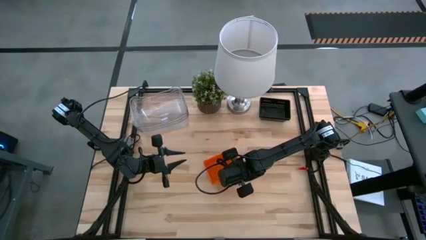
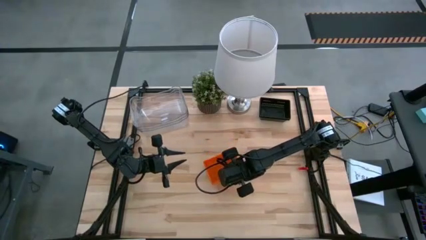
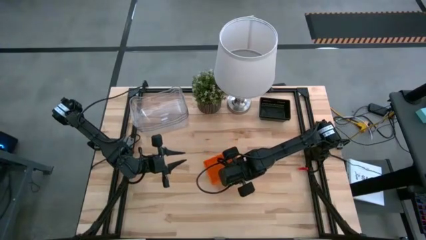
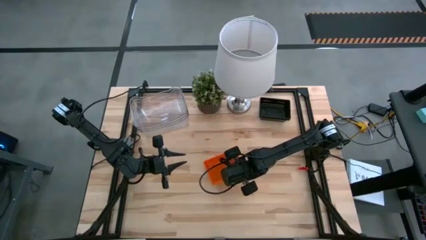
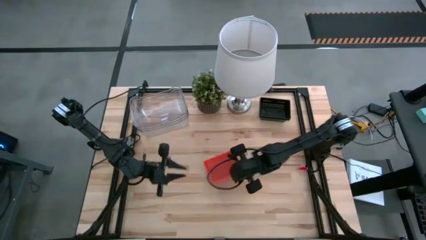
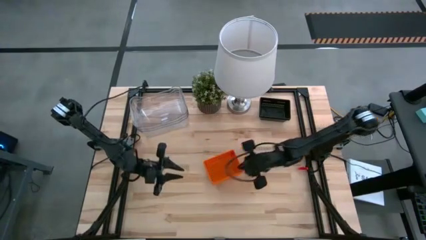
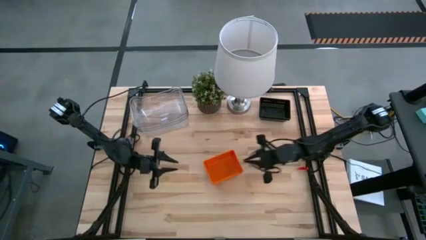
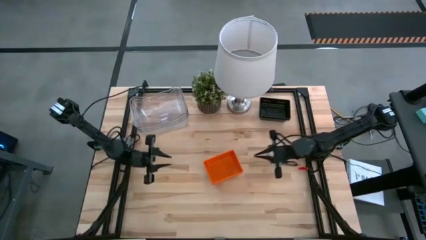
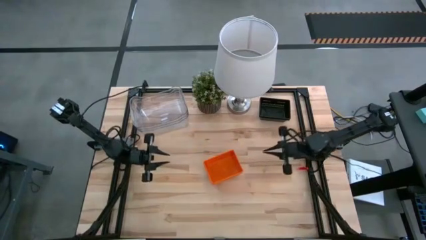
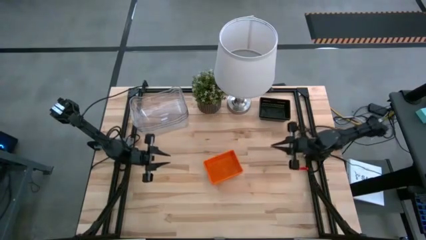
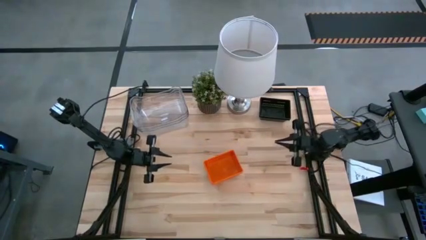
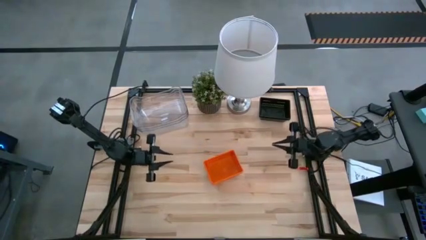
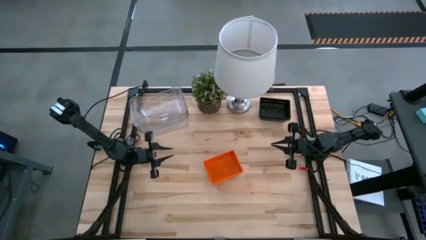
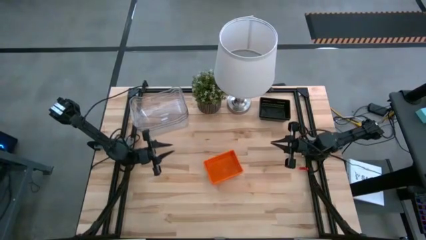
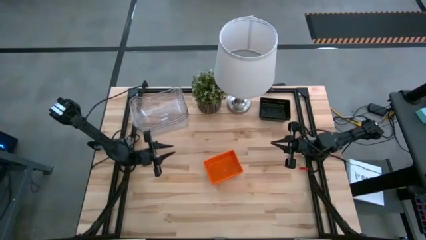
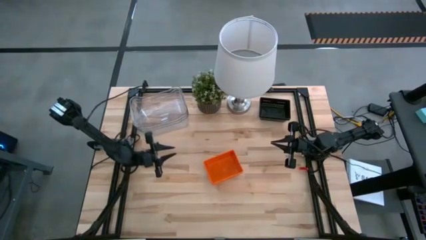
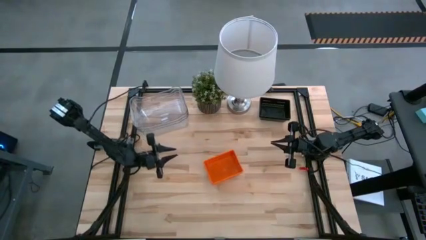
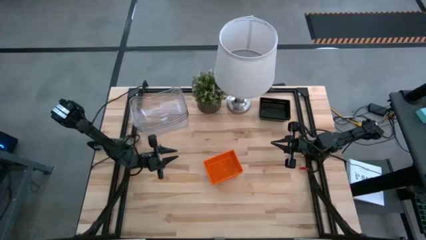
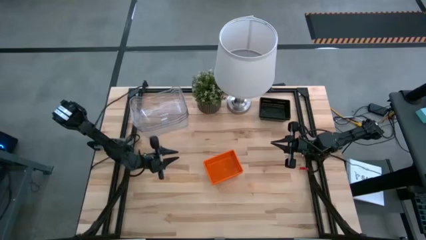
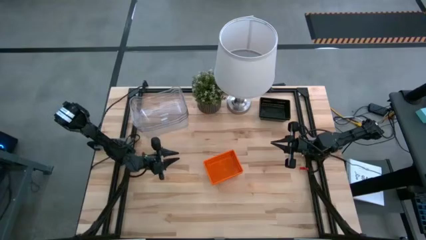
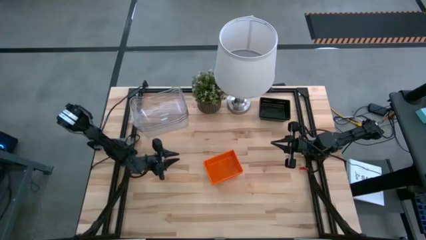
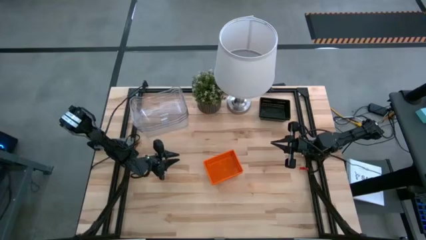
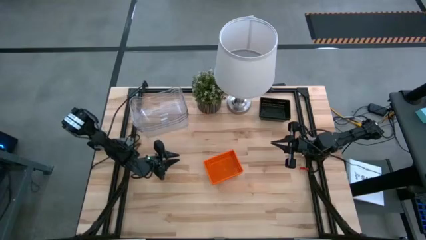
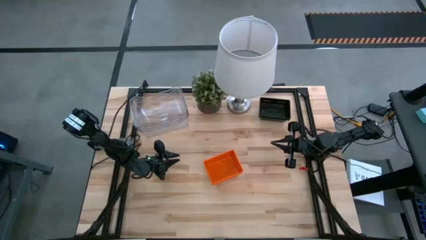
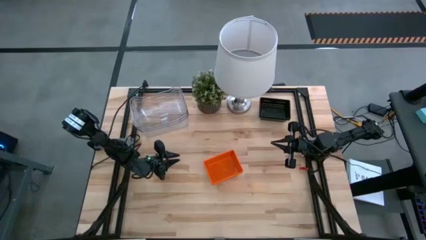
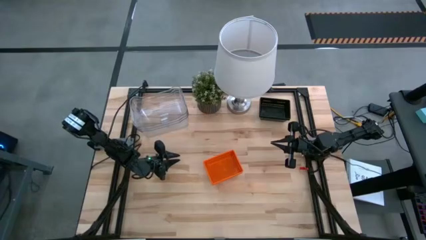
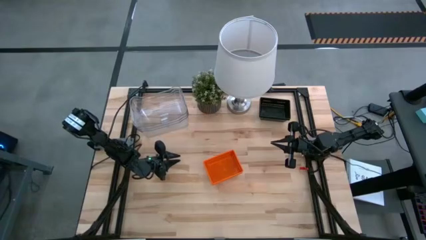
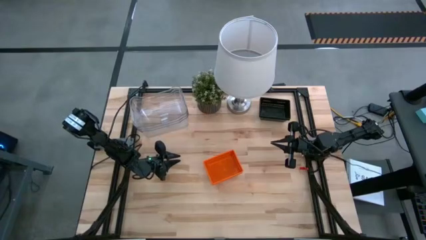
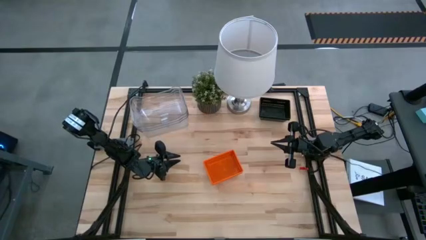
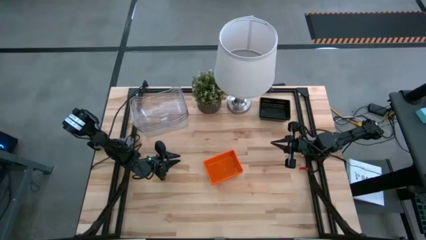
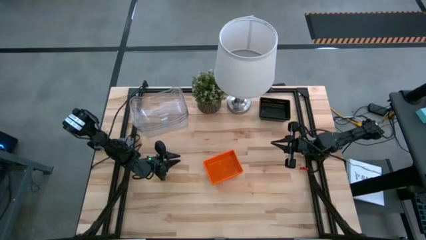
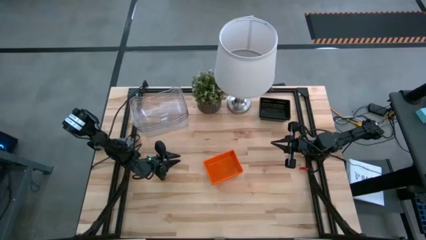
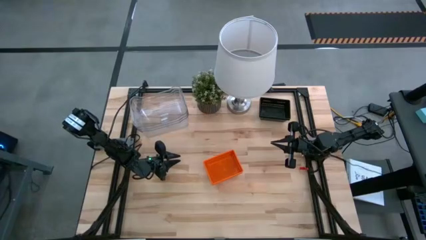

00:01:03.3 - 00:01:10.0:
Return to Home Position

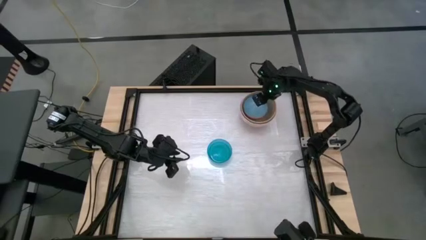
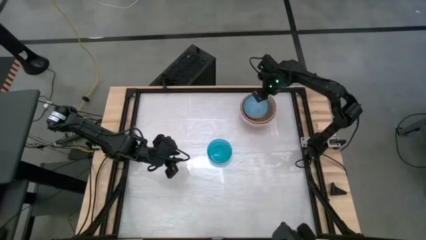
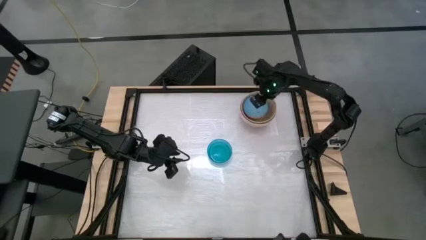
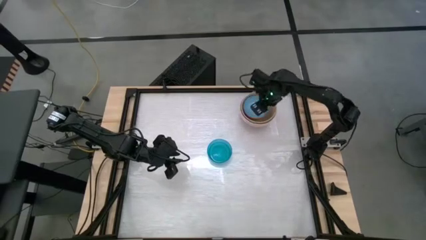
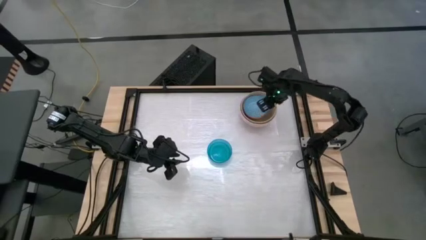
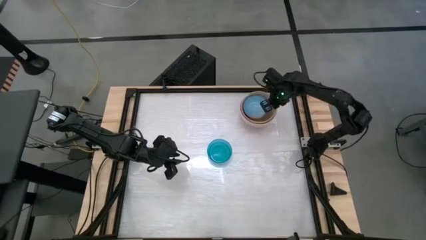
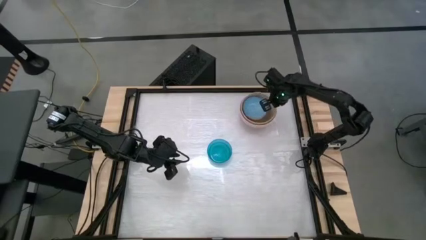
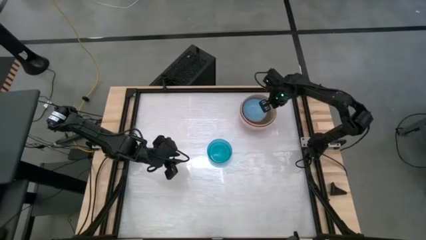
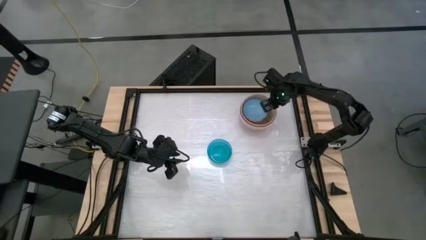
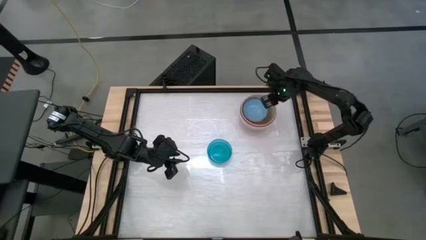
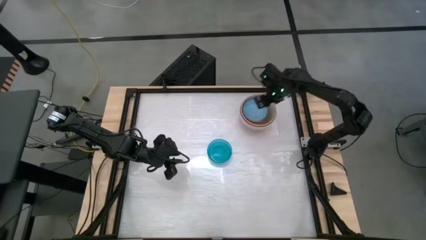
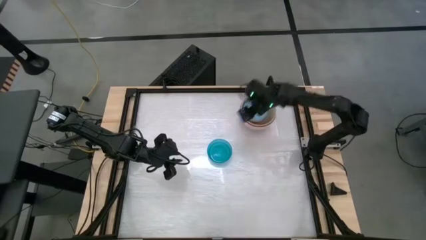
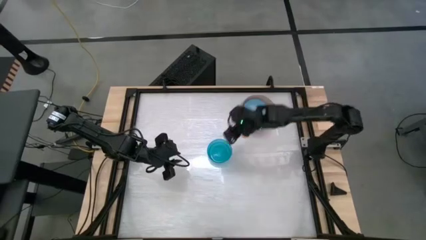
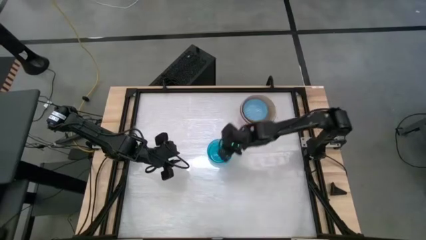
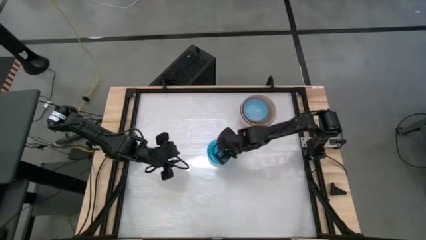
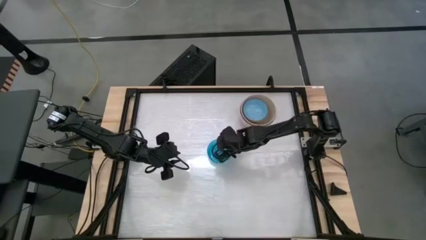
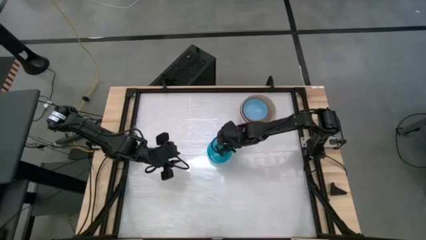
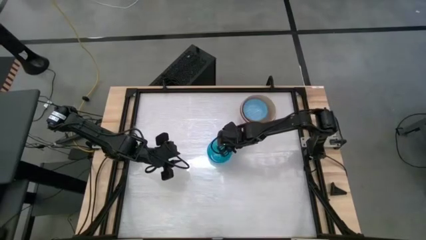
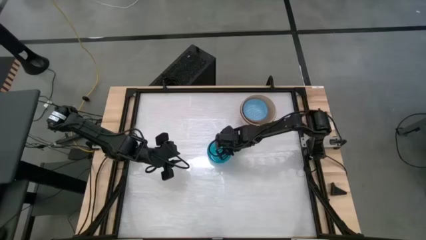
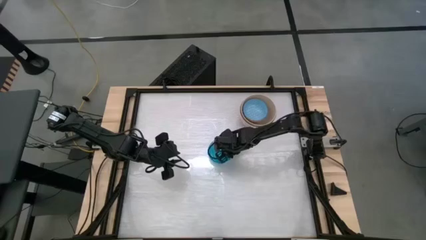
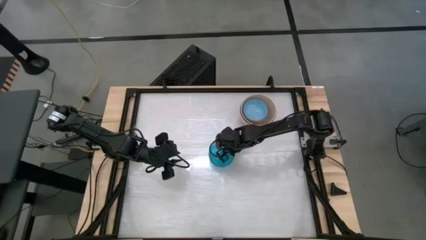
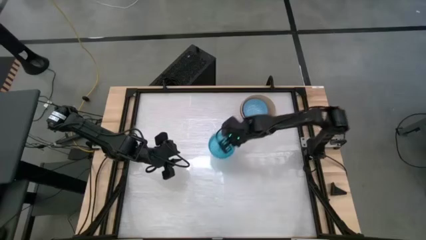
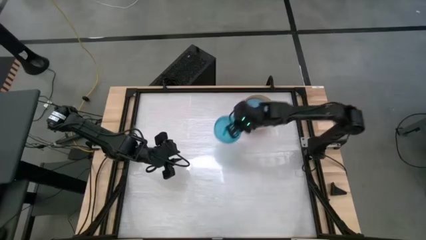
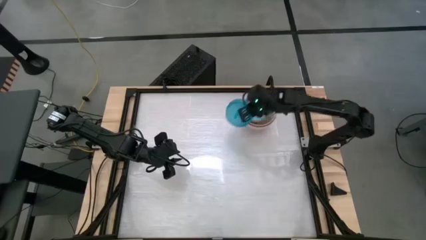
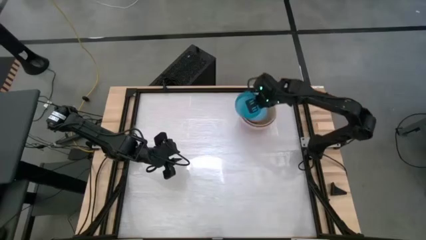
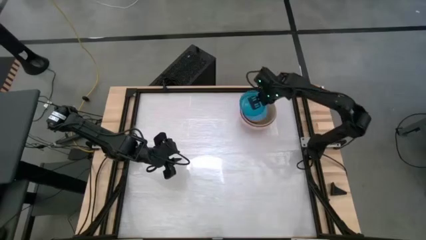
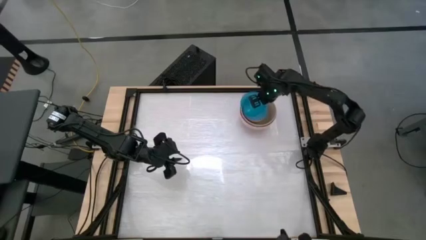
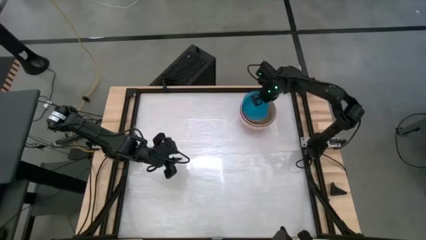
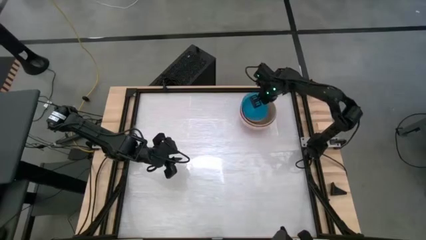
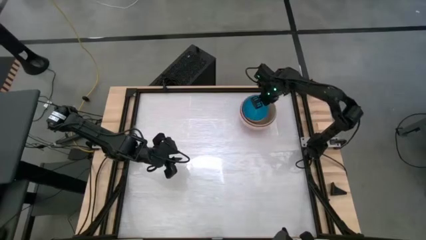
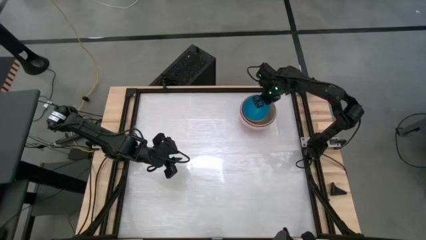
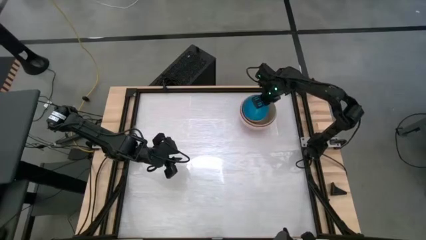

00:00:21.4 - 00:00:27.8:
Stack the blue bowl on top of the blue-patterned bowl

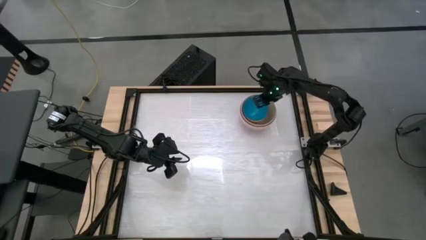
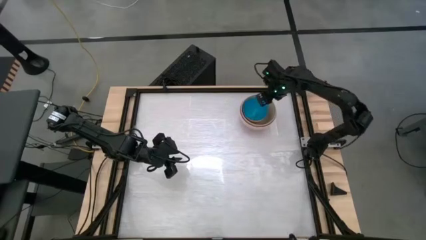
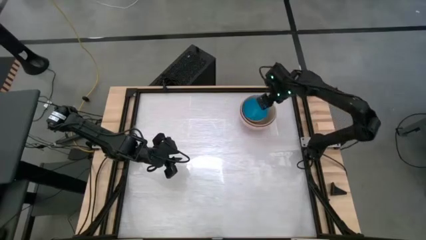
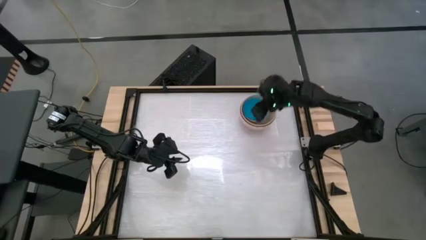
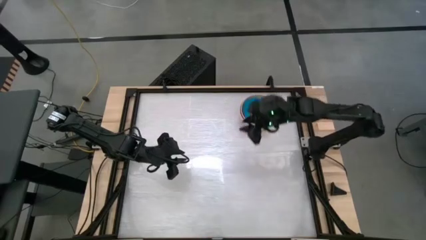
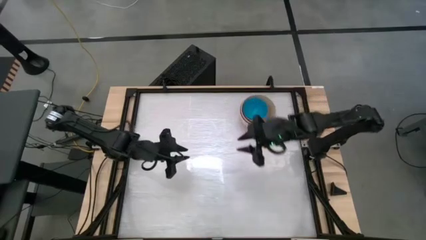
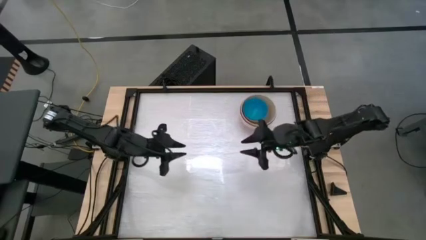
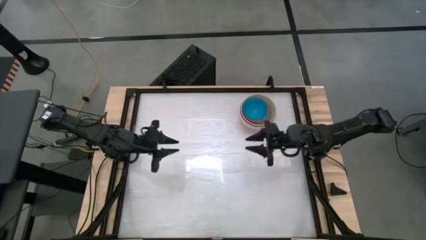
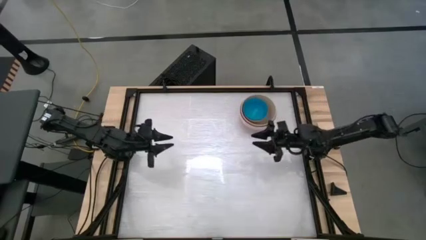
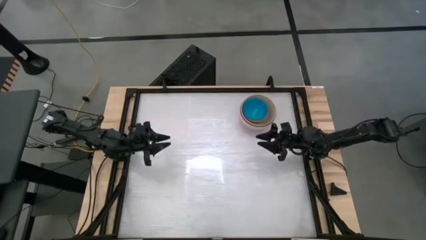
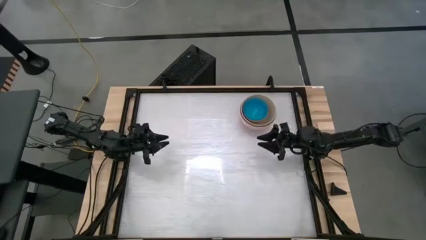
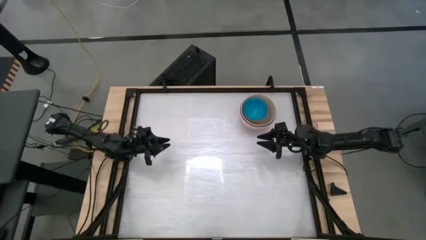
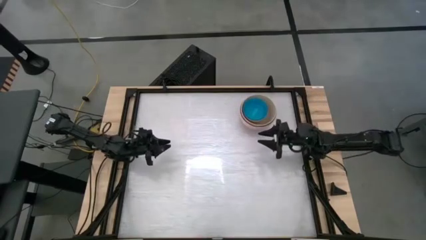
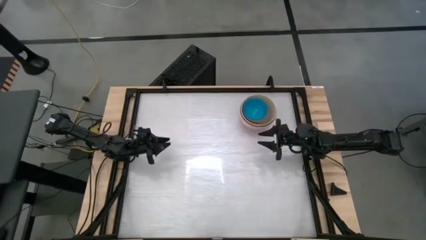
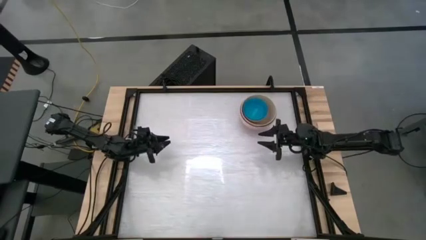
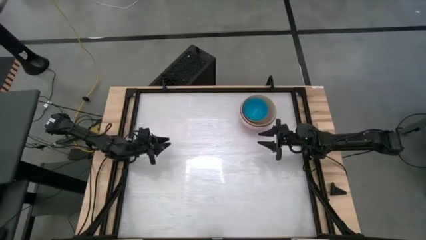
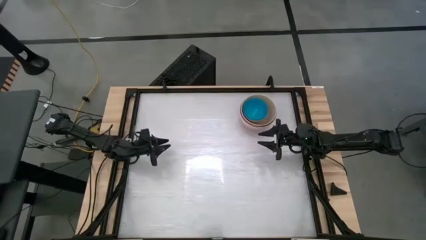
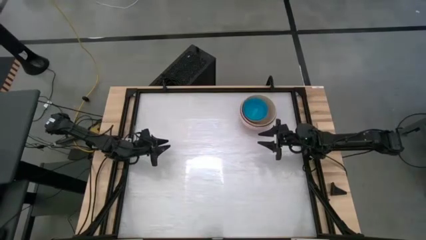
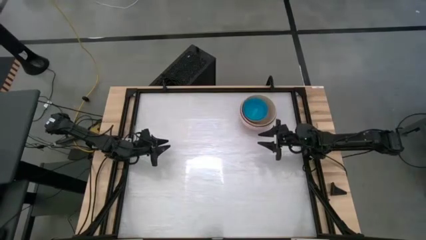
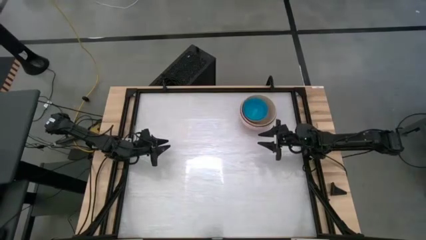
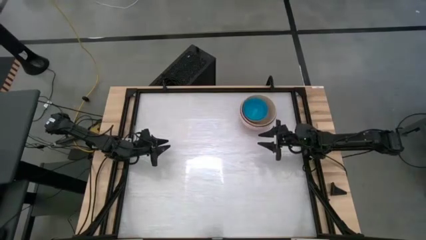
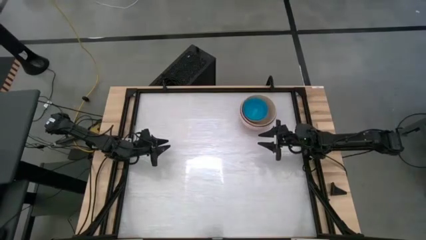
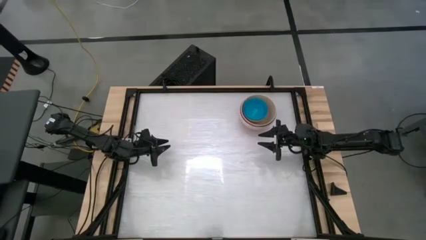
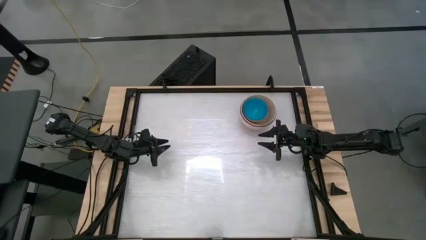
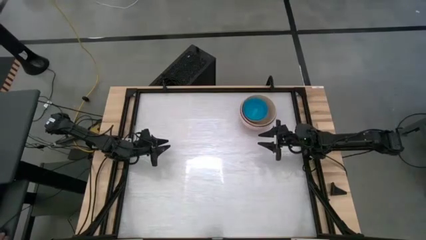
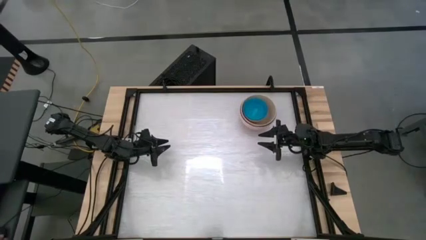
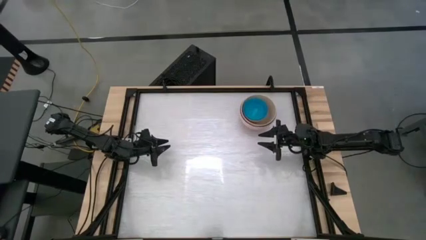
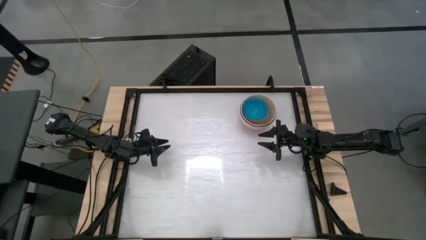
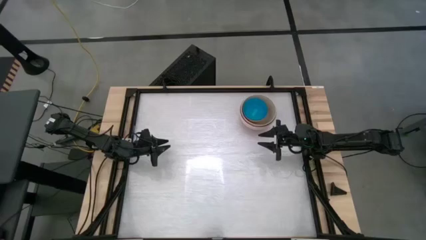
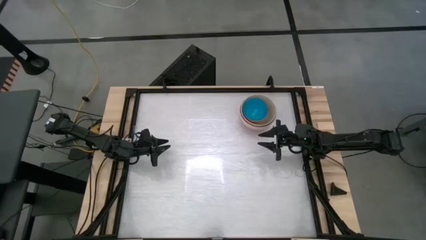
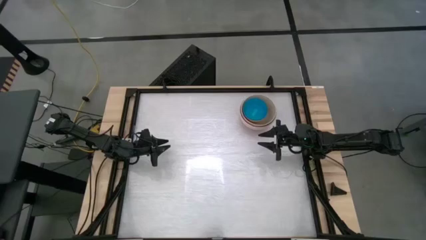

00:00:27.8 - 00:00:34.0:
Return to Home Position
